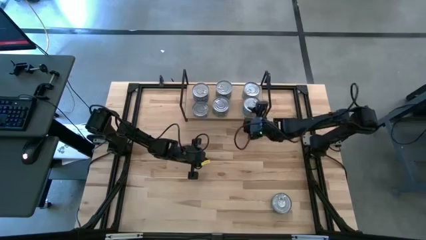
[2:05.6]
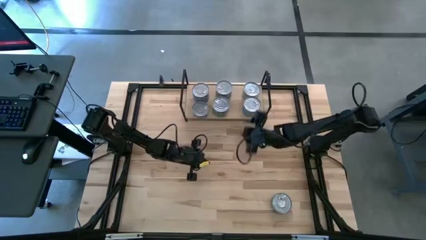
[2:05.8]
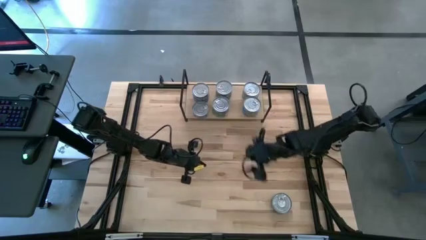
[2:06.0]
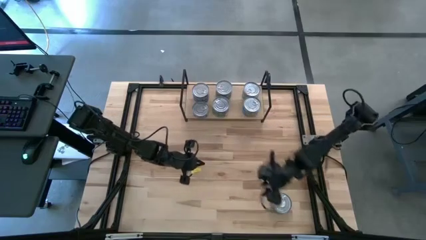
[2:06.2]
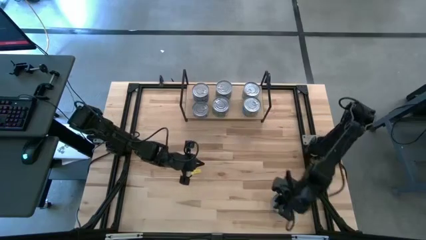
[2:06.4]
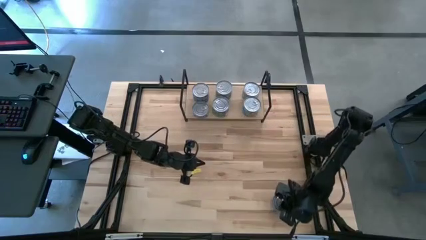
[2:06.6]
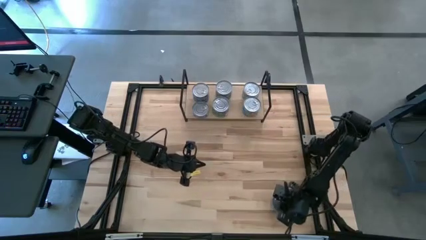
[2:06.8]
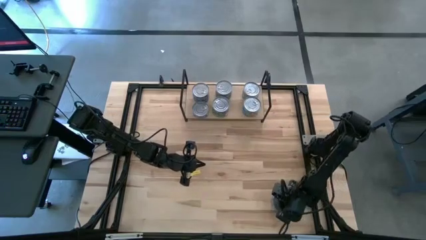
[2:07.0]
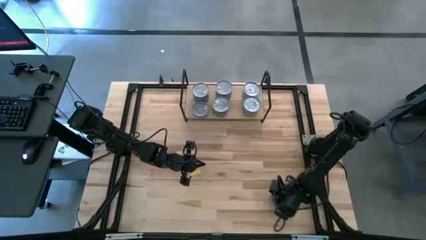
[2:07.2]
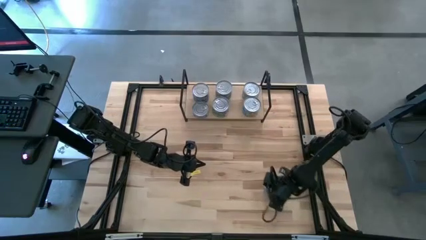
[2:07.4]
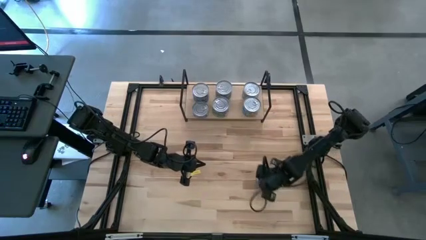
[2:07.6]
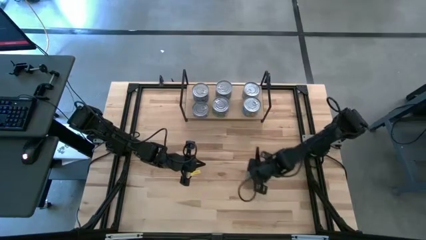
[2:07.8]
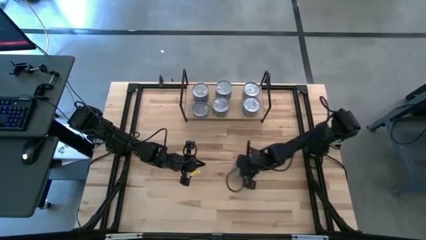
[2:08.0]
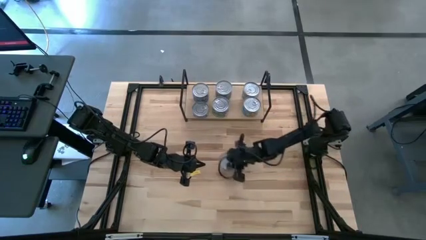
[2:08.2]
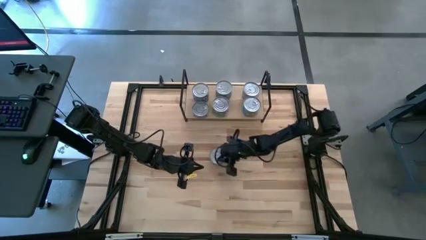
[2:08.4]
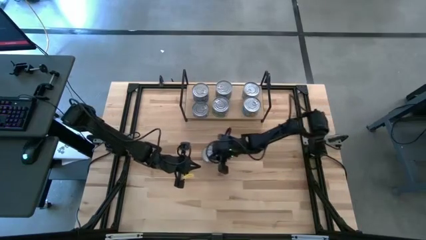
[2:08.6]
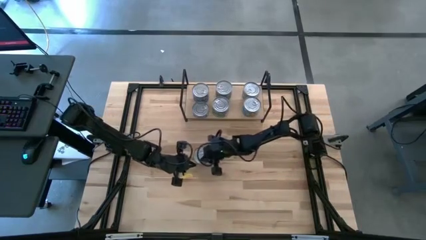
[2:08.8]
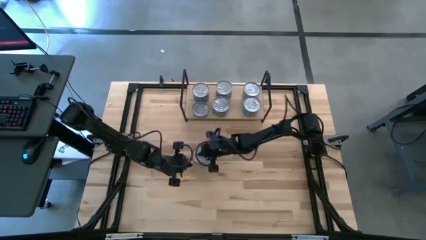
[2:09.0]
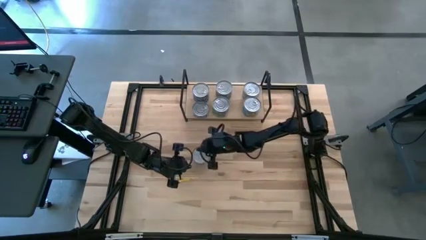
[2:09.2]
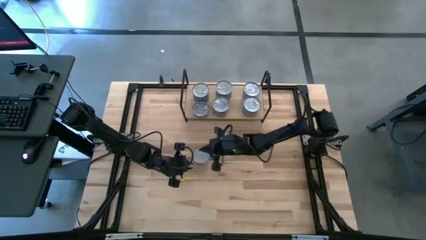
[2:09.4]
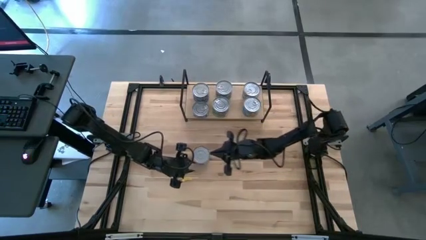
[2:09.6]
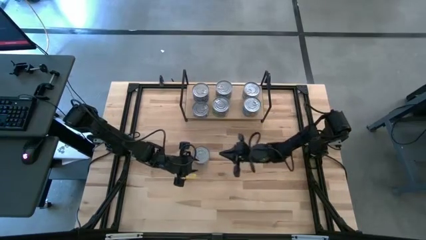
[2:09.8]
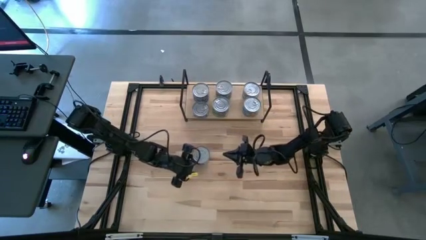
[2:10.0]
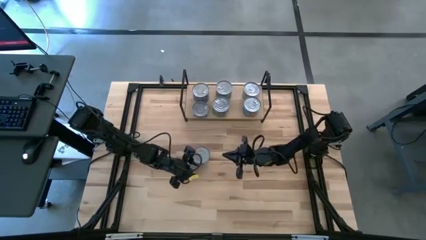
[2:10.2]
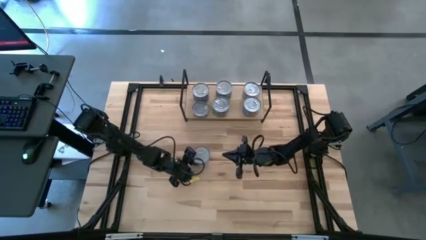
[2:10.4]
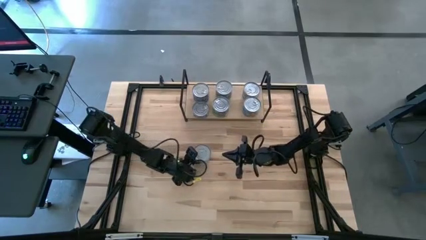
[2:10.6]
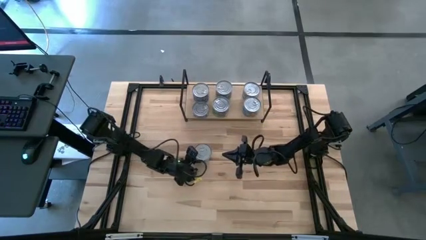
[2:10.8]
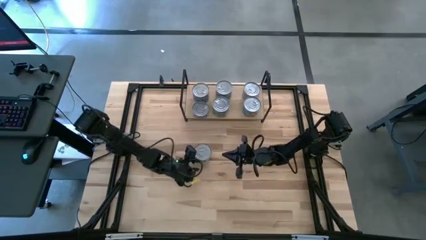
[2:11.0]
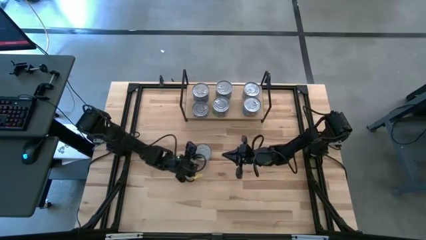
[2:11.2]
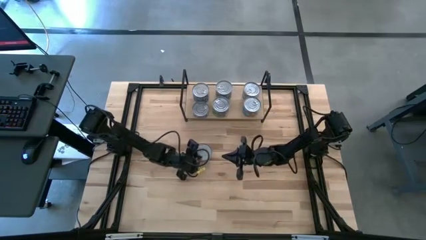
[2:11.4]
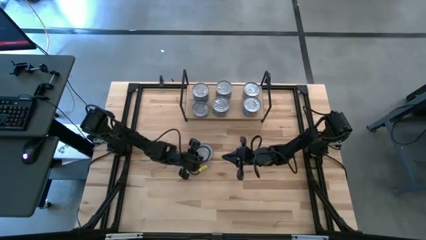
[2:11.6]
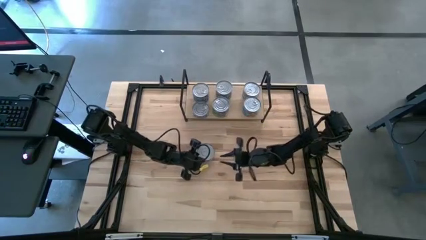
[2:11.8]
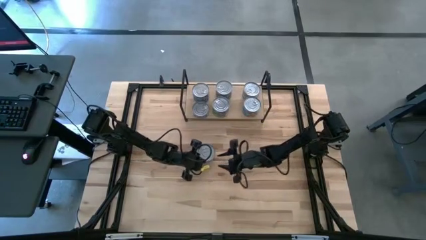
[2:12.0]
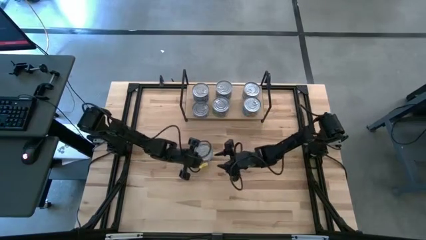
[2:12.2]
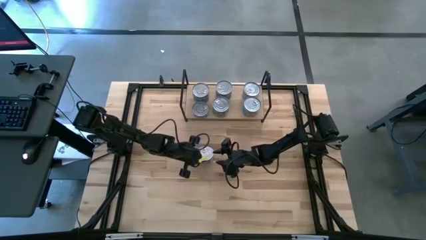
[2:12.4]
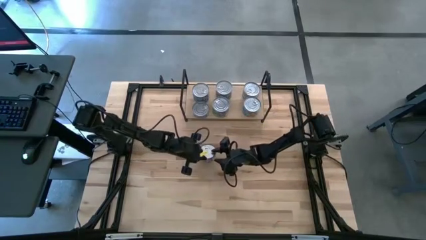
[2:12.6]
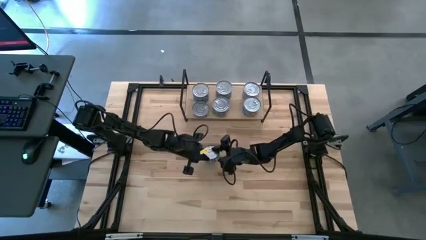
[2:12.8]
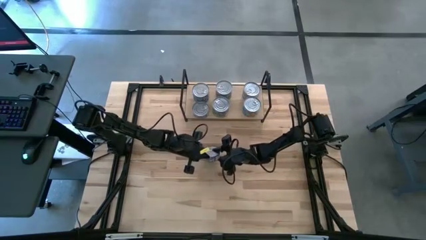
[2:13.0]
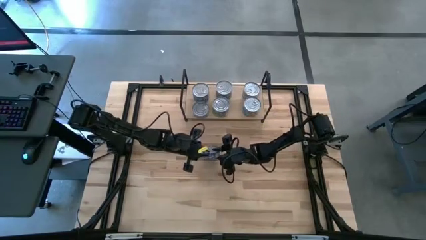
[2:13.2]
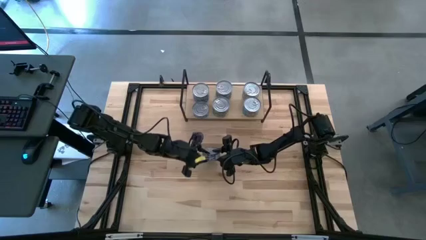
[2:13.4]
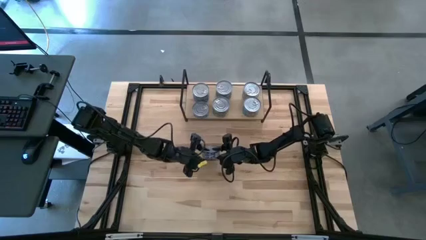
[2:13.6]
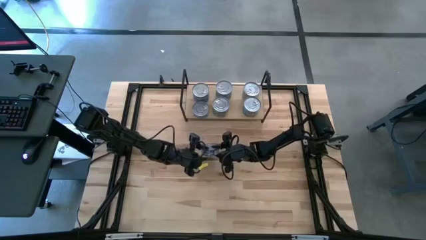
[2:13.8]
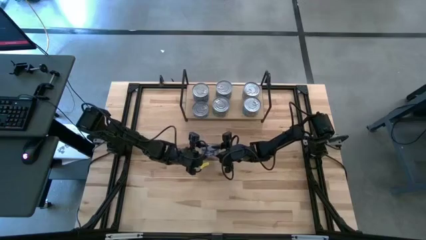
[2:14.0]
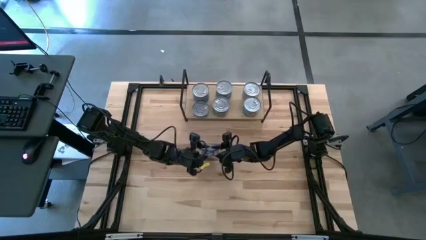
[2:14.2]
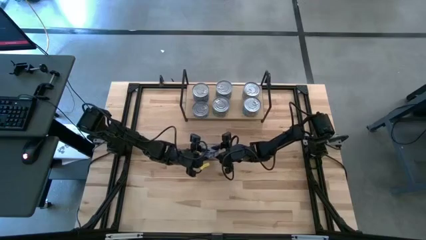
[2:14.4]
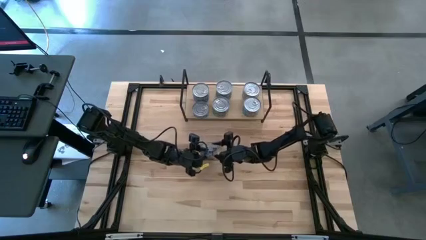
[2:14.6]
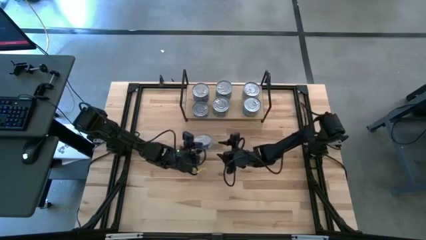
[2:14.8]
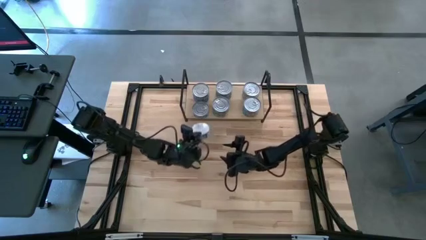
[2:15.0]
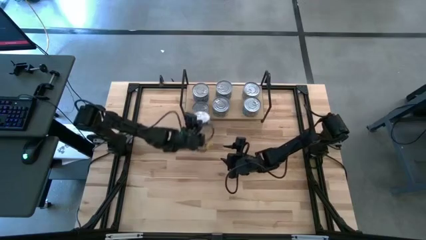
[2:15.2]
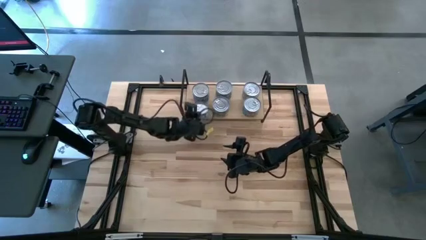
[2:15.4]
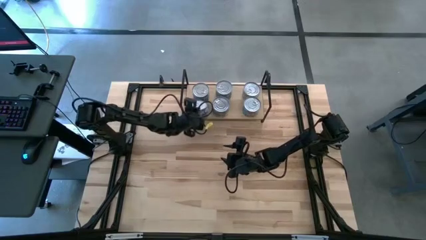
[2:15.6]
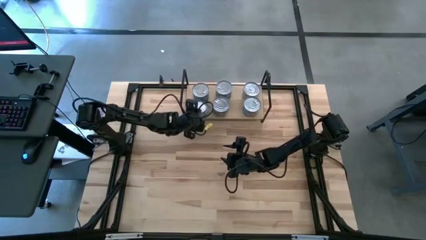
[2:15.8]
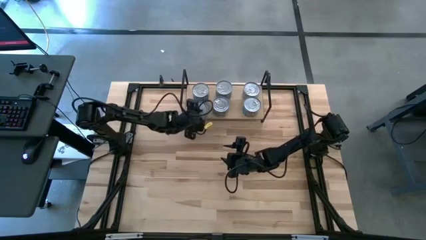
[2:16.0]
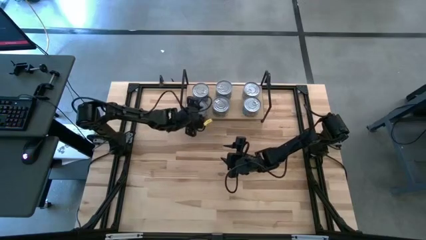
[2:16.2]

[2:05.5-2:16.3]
Task: Stack canned seafood by type on shelf
Stack the blue tuna can on top of the bottom blue tuna can on the shelf

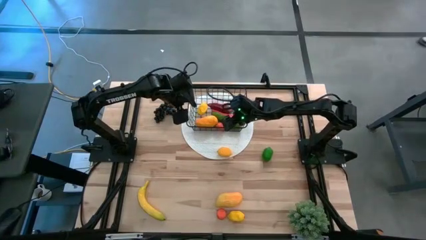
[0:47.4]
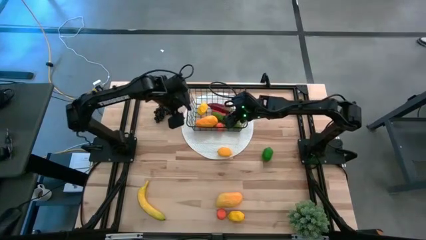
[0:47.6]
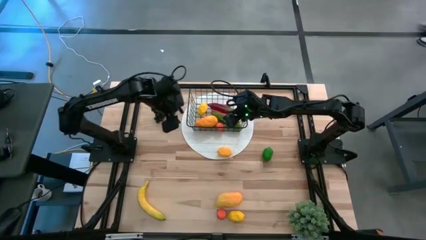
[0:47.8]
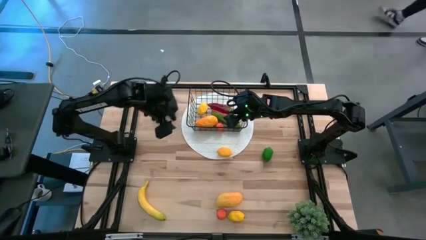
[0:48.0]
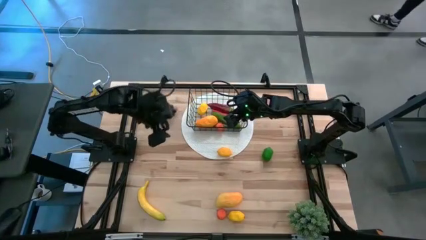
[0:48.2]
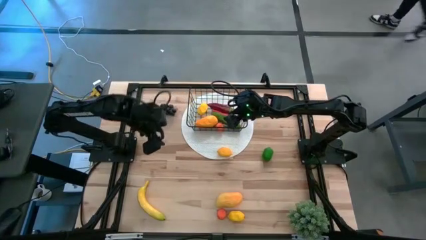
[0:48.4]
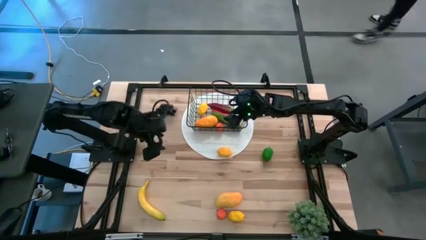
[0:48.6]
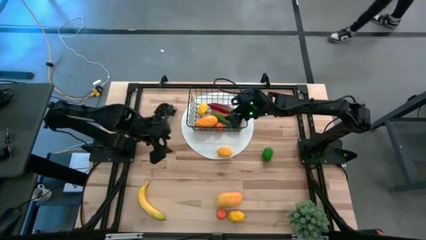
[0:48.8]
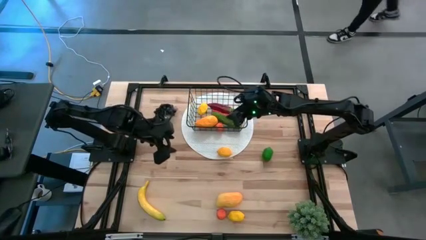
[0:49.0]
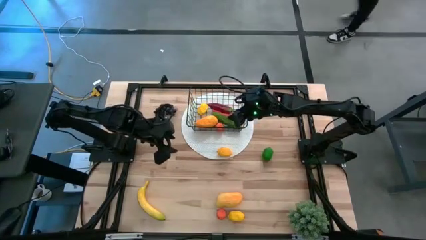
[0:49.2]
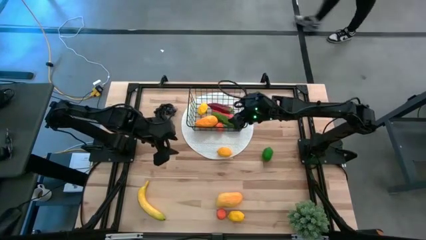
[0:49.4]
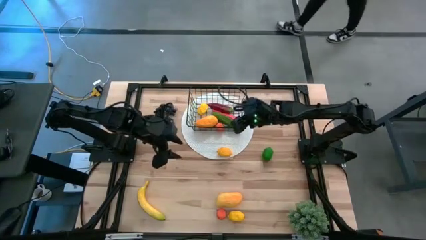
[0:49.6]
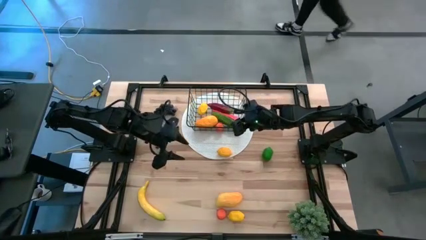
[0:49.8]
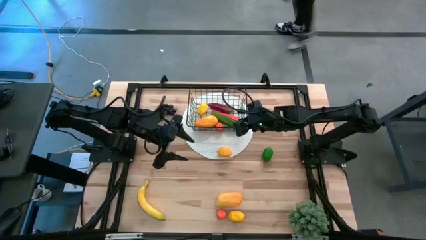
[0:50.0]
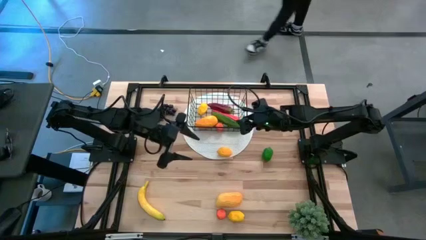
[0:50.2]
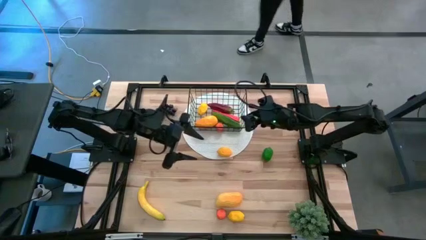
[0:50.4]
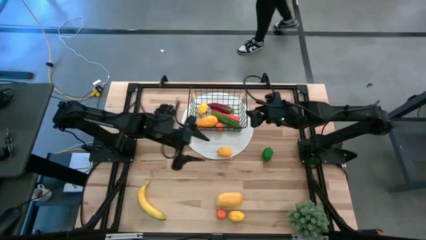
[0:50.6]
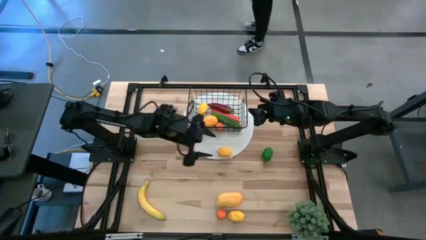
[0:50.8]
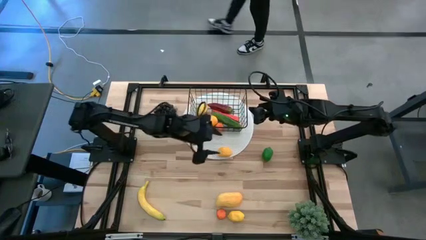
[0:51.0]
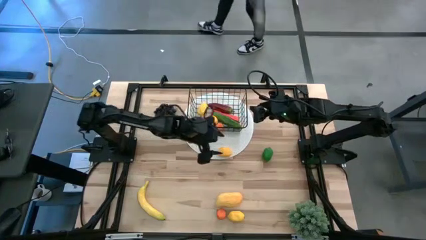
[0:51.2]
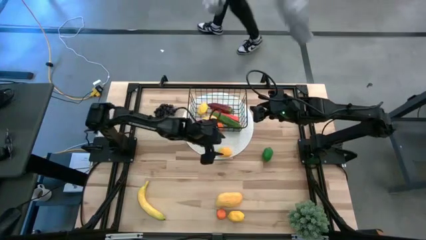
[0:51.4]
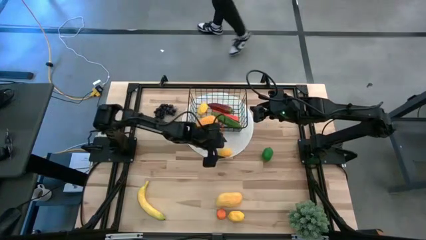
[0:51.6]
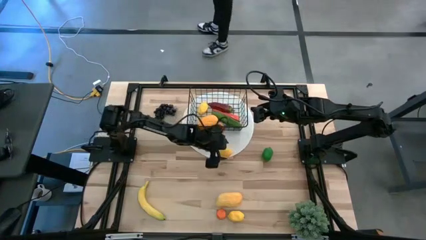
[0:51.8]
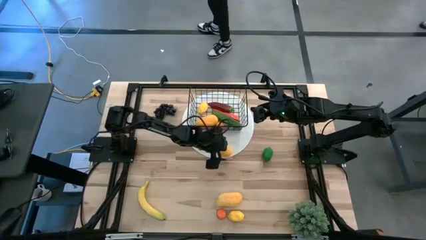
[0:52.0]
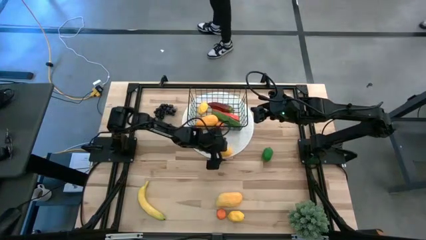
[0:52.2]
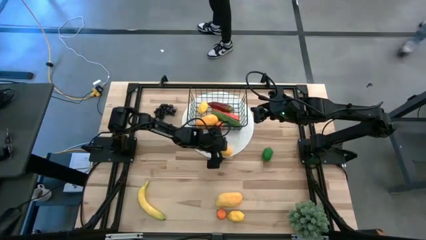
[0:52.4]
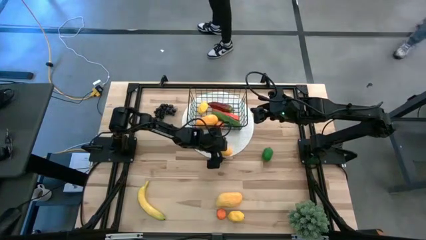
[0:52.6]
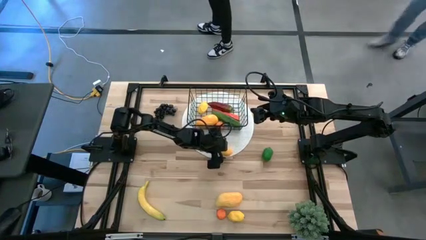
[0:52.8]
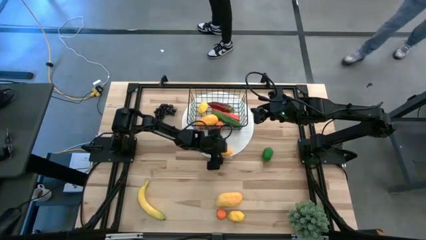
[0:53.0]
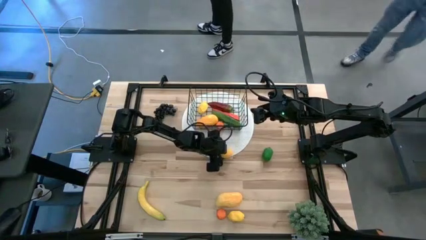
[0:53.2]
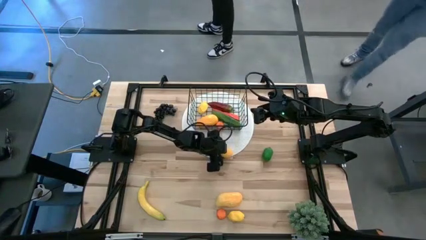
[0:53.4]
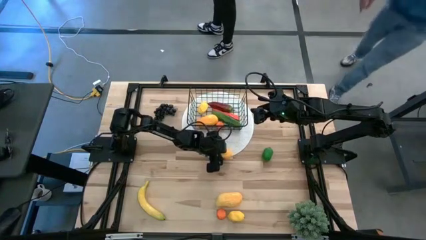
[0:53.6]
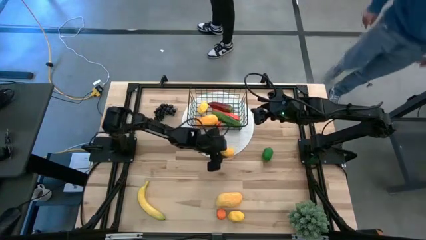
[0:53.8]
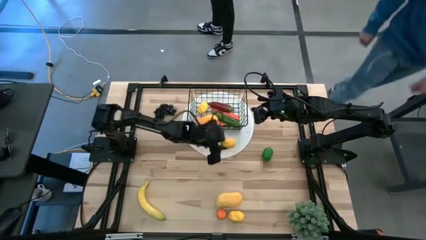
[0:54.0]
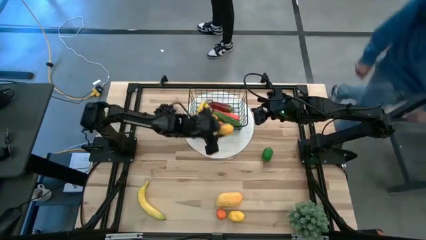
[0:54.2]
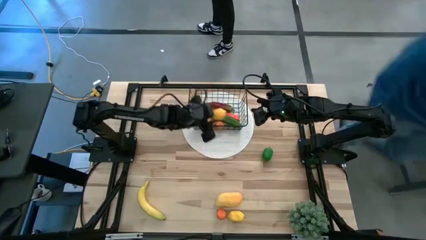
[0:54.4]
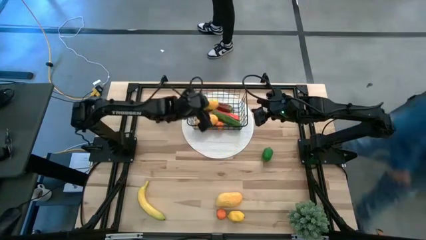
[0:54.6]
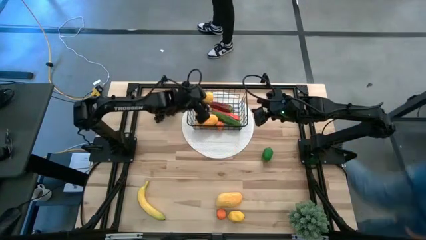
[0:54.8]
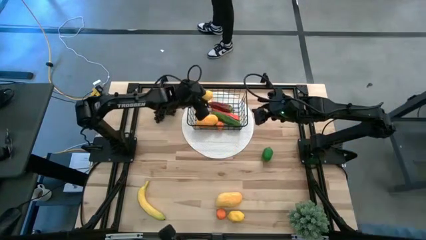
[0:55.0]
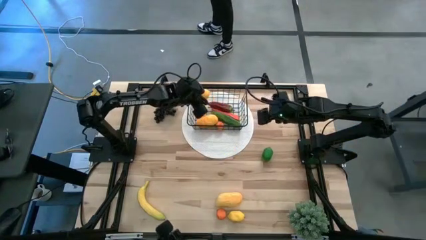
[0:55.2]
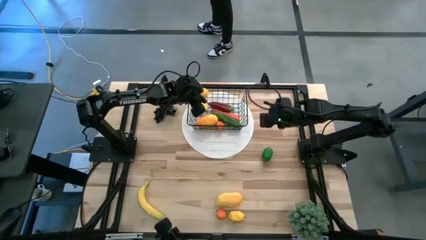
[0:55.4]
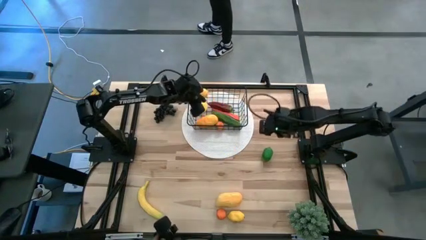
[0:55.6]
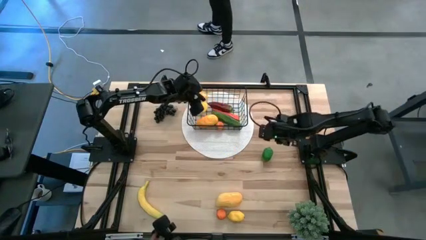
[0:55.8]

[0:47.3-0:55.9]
Task: Build produce basket
Put the top yellow lemon into the black wire basket
